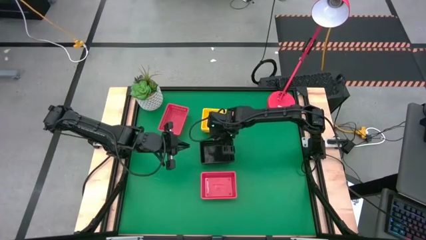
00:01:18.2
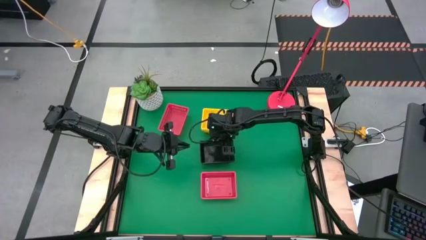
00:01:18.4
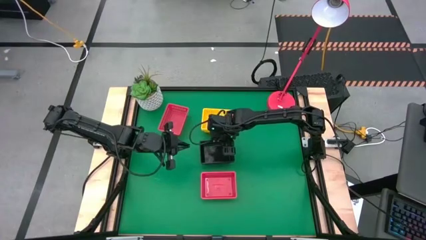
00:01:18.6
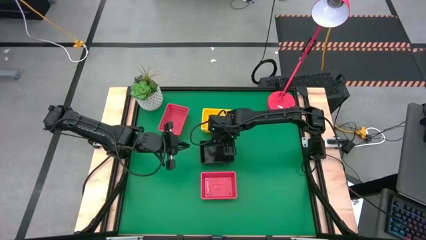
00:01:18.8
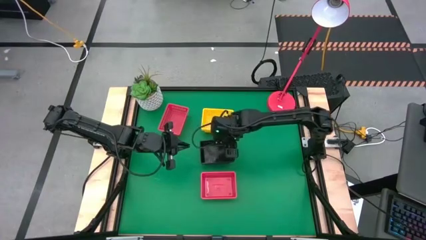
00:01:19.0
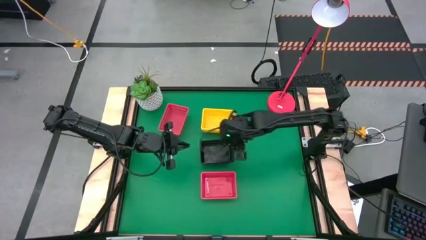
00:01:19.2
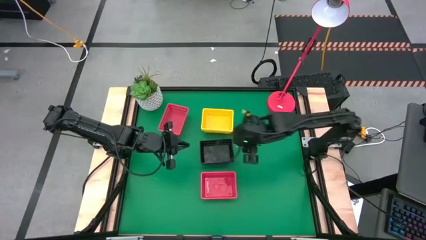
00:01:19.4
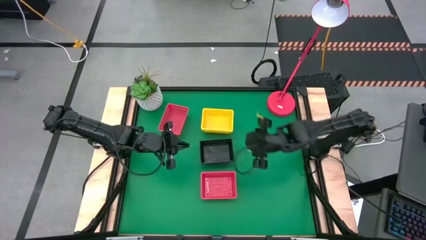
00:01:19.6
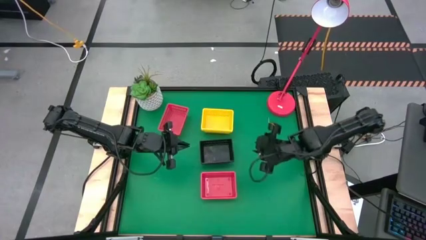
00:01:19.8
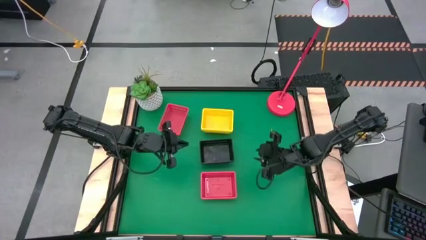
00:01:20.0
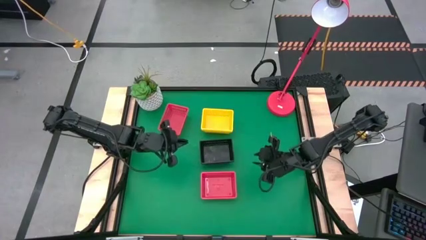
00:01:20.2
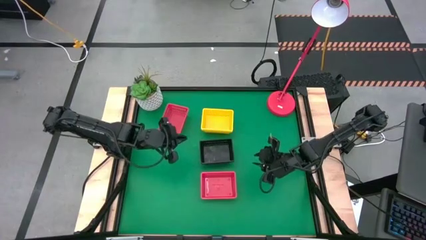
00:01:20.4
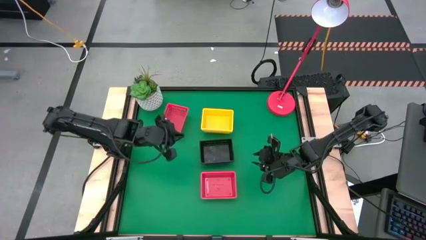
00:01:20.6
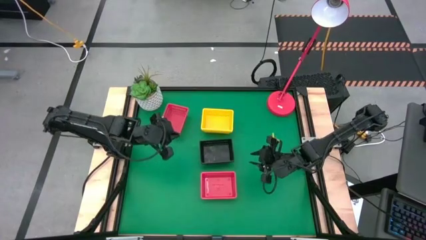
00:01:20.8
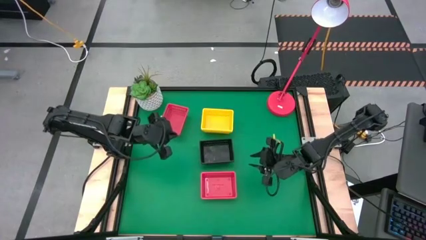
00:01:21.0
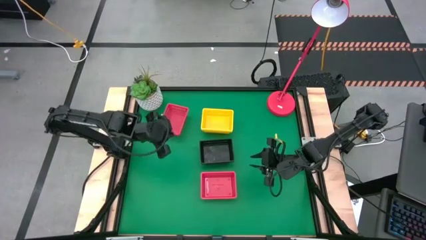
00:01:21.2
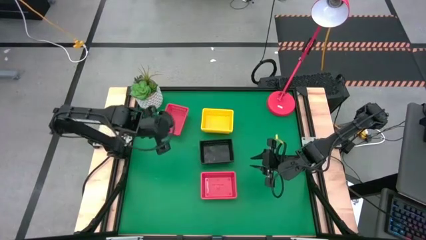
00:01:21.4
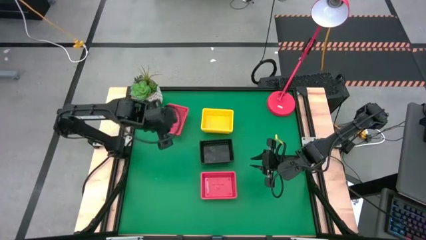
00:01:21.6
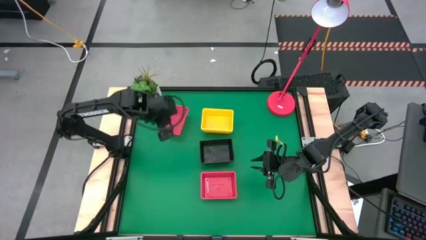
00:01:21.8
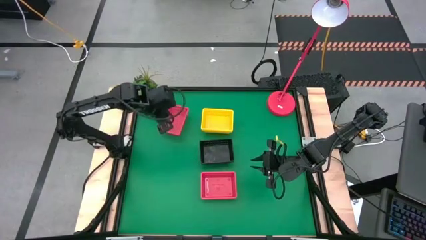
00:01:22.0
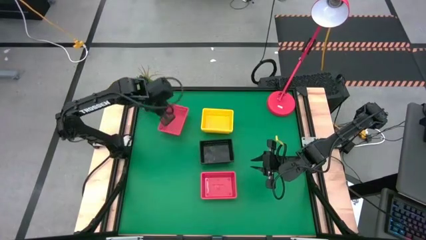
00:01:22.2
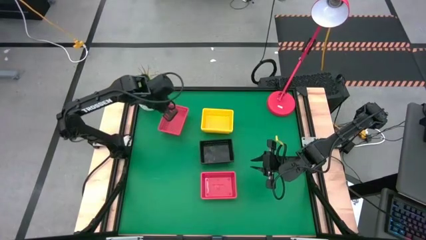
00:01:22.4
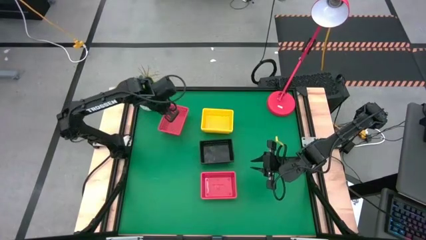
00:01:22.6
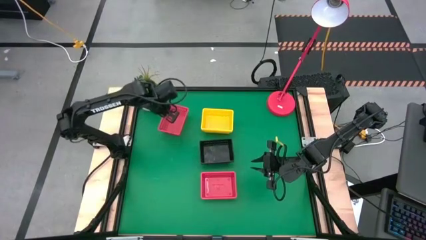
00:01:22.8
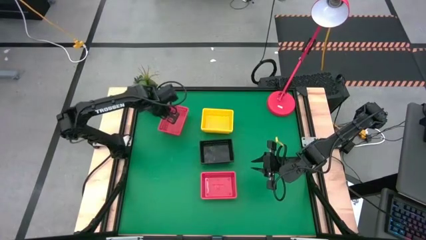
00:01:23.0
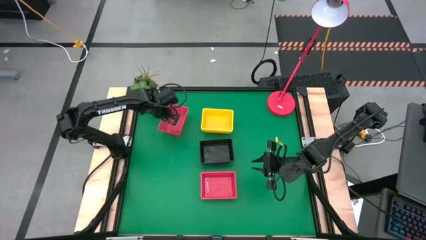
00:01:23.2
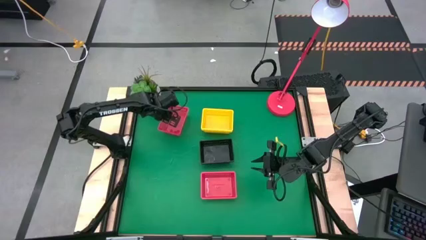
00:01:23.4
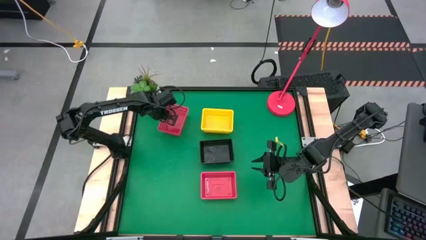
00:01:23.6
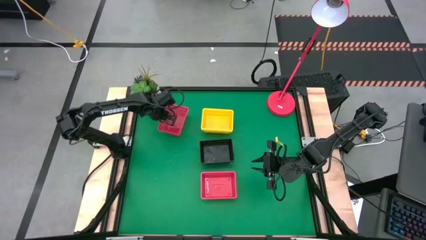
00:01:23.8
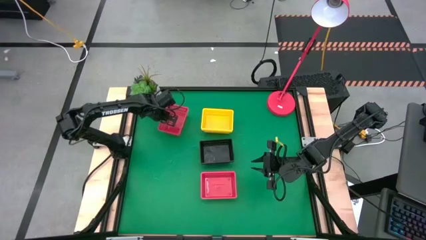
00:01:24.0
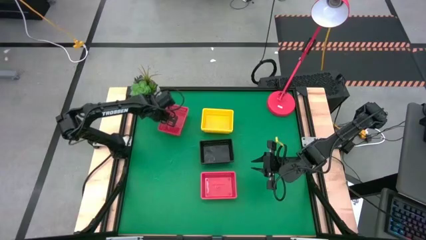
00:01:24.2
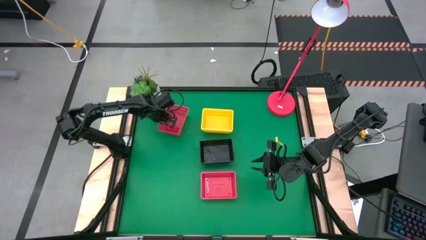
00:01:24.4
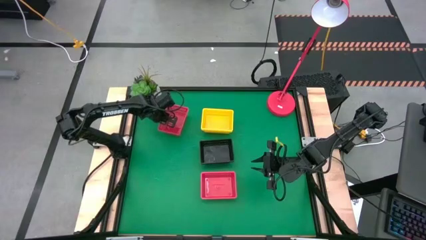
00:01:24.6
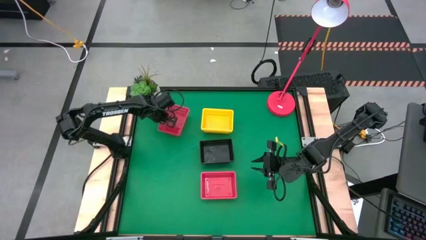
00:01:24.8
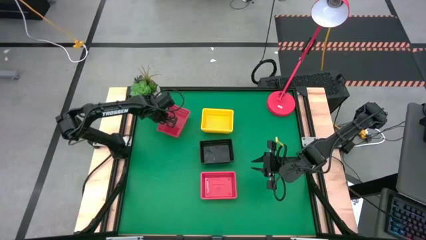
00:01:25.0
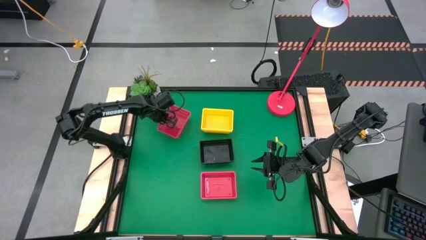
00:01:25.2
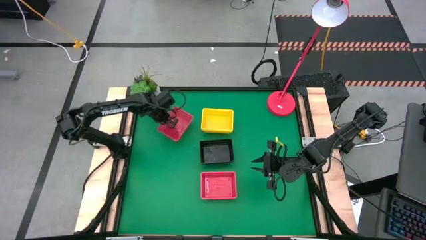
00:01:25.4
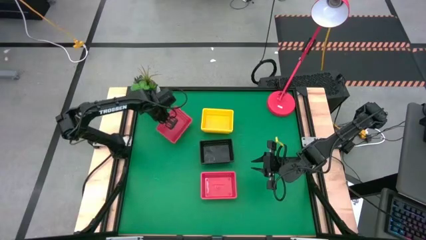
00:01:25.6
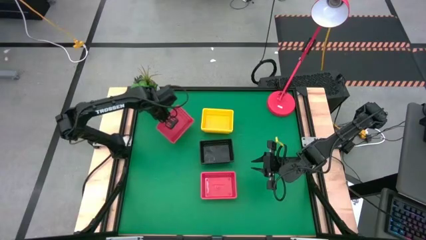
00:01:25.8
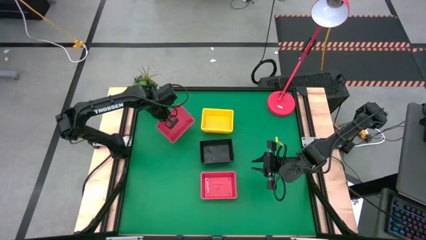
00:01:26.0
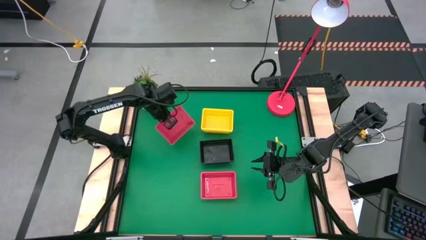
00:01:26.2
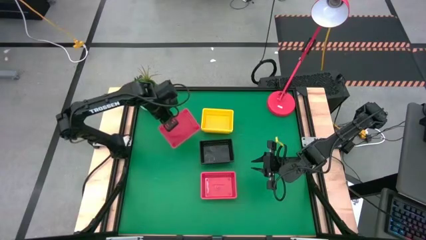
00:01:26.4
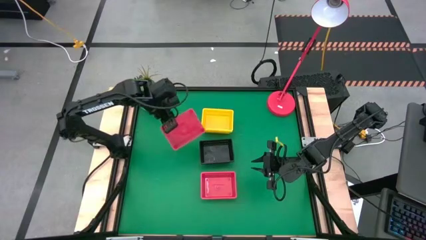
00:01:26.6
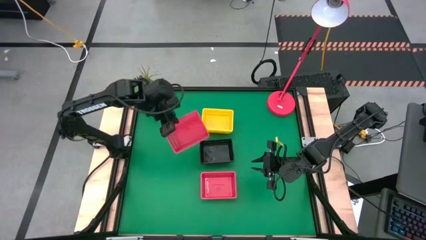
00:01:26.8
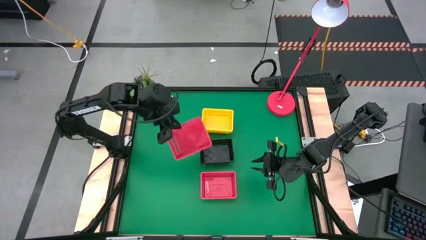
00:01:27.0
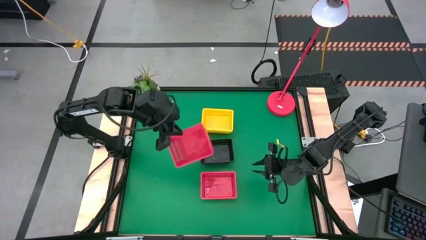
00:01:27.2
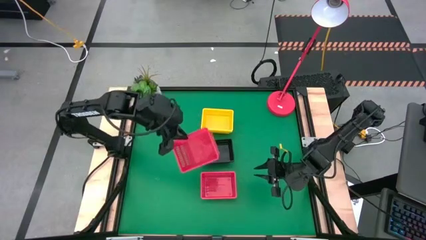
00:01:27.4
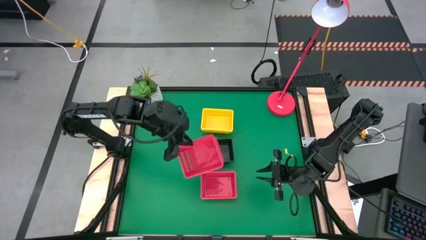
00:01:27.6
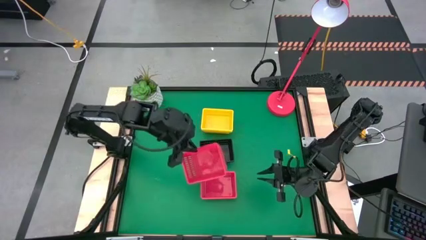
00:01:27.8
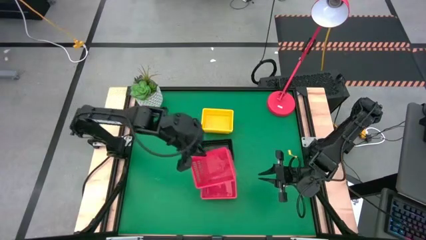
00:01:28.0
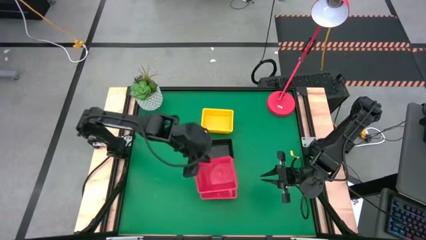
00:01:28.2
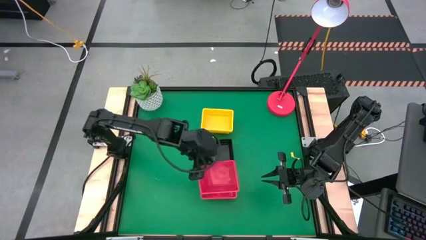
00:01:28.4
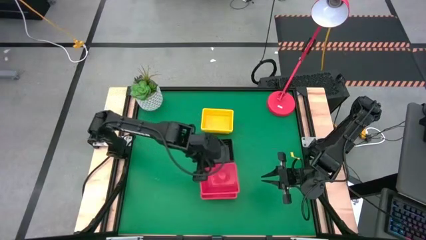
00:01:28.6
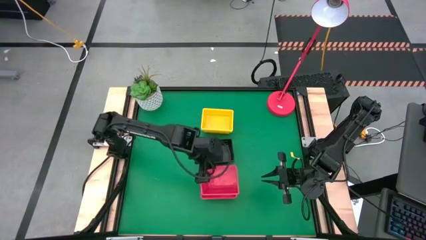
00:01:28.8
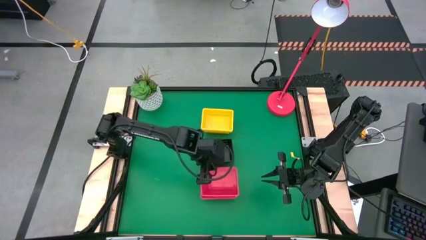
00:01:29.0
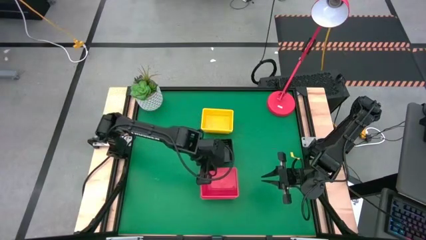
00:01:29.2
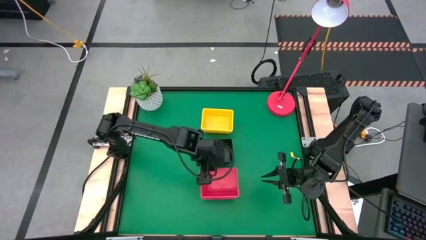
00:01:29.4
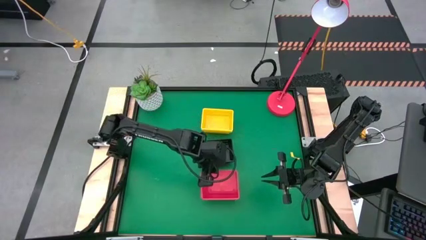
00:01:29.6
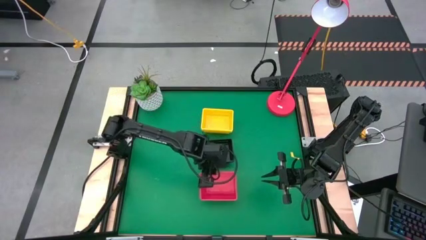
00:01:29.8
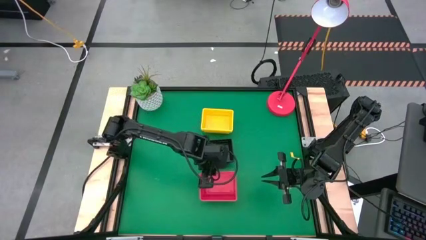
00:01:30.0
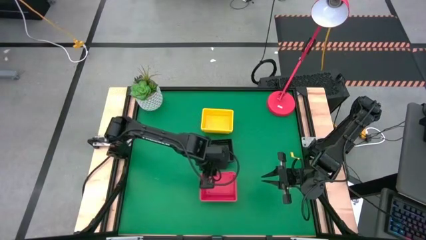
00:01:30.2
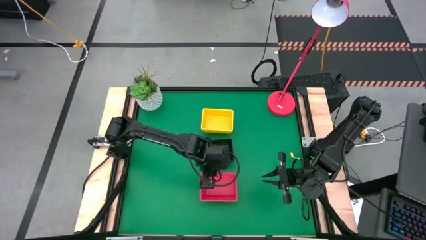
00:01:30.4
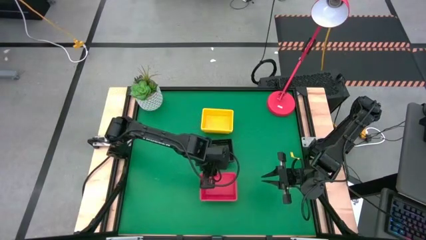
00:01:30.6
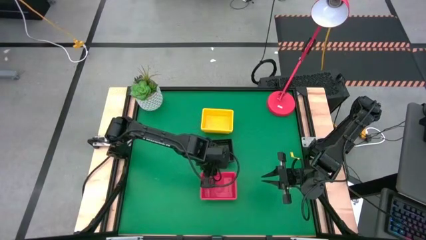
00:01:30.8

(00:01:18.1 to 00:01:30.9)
Stack the top red basket on the bottom red baskets

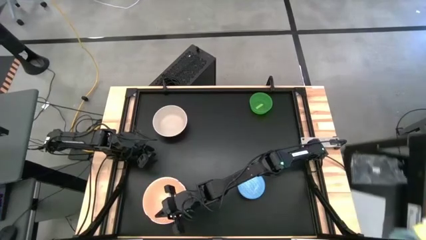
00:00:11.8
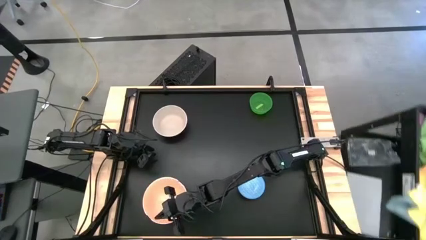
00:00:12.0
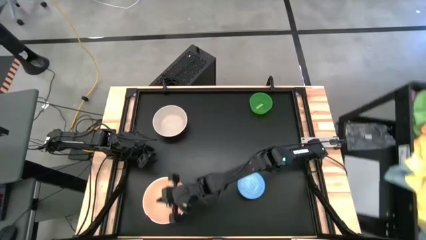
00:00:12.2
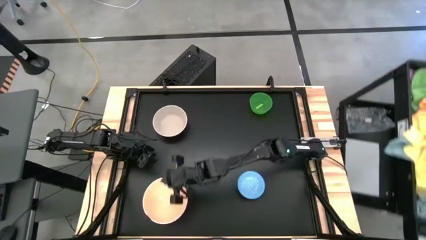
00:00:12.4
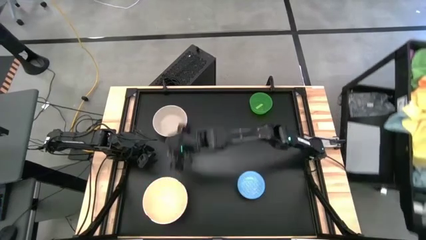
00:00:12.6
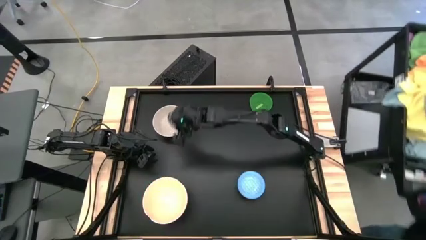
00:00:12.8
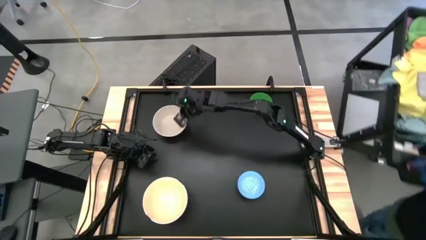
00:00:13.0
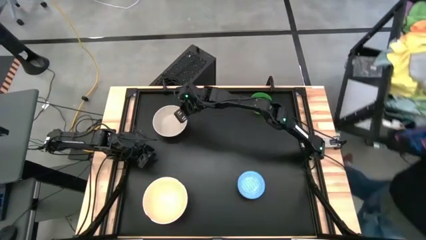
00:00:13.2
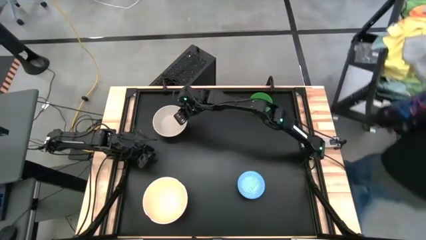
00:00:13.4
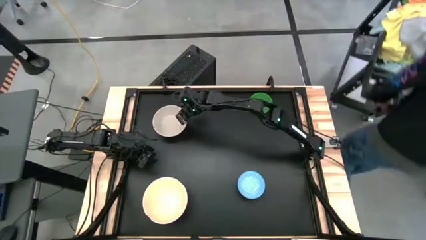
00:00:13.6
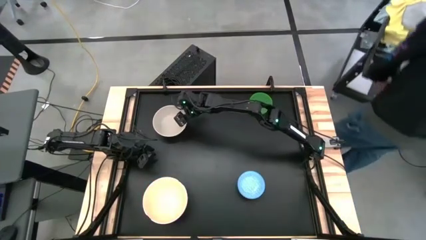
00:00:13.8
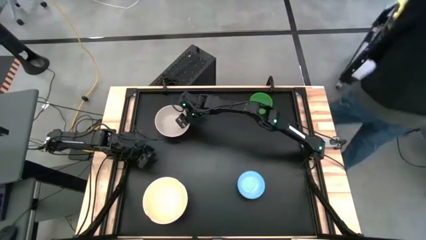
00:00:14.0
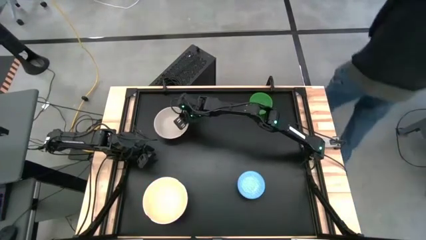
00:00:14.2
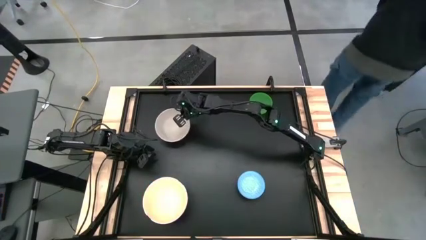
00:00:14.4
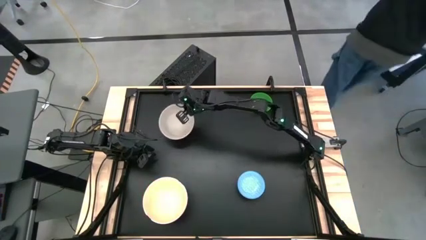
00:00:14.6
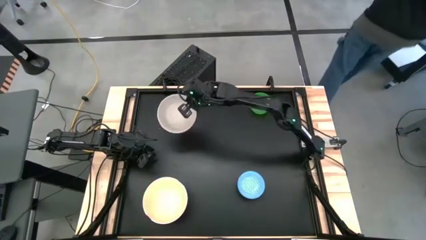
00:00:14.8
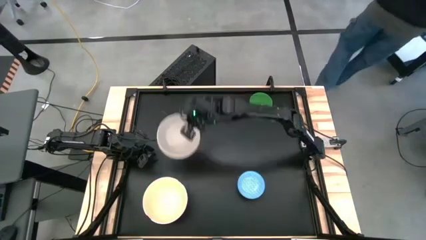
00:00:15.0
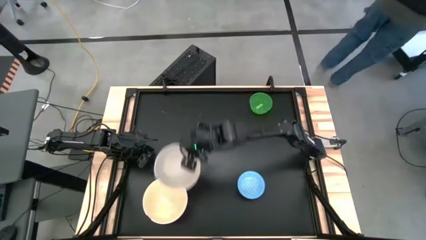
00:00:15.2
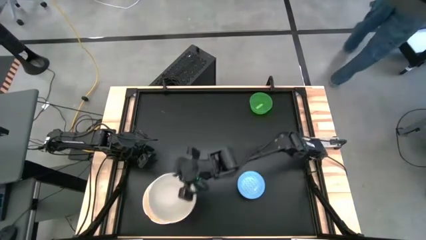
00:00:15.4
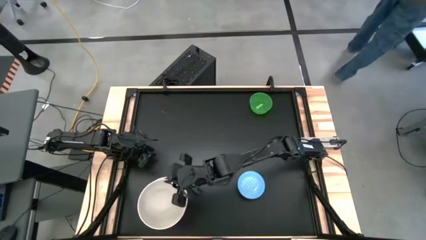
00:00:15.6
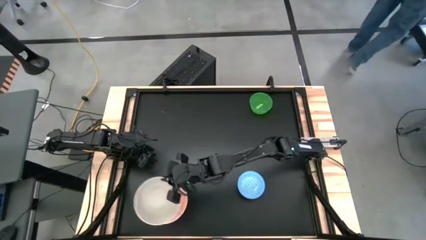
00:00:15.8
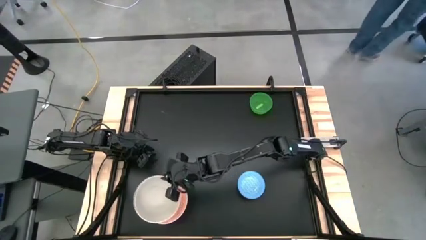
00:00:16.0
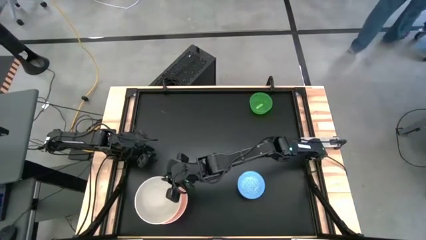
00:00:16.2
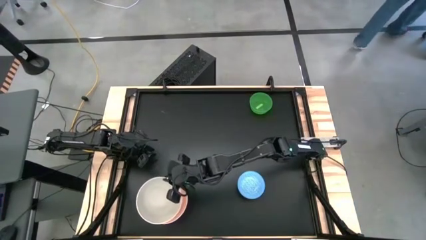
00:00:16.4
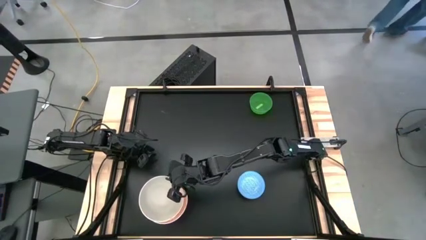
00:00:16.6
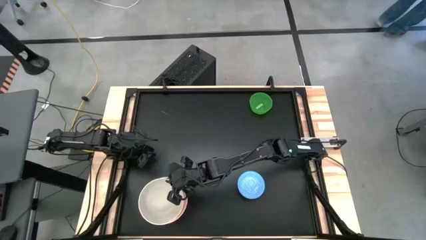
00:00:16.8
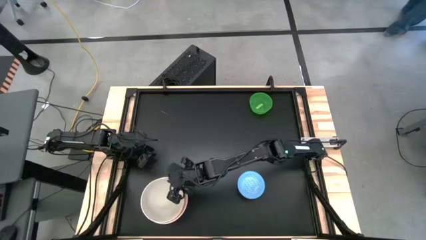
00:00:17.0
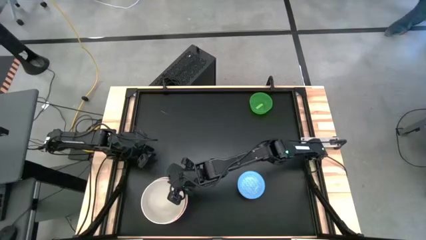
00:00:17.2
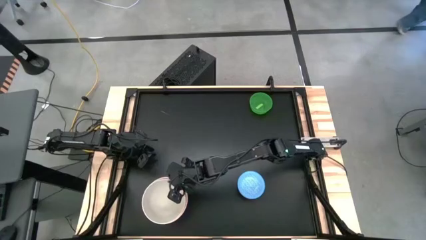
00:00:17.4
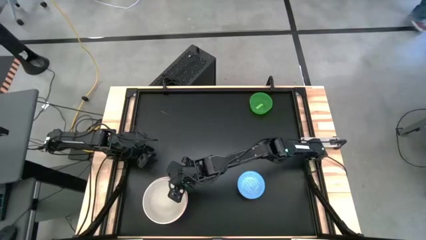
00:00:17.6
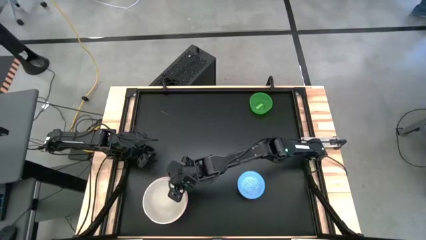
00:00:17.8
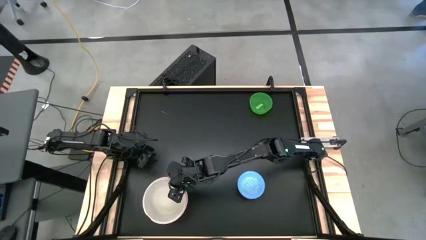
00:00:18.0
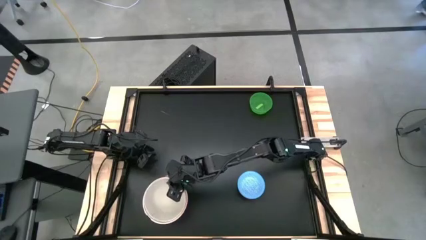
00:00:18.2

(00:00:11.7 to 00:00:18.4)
Stack the white bowl on top of the other orange bowl
